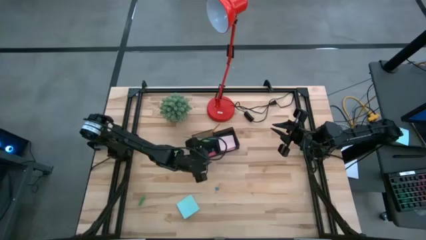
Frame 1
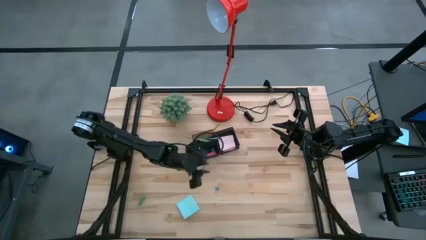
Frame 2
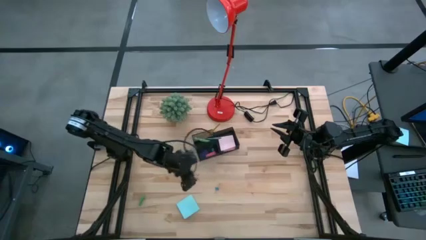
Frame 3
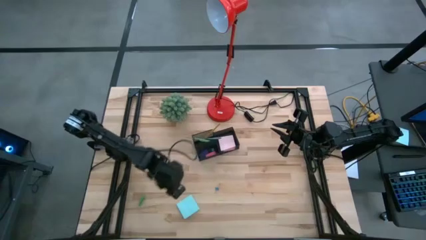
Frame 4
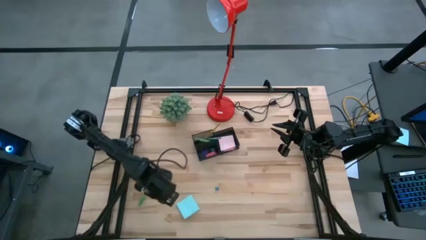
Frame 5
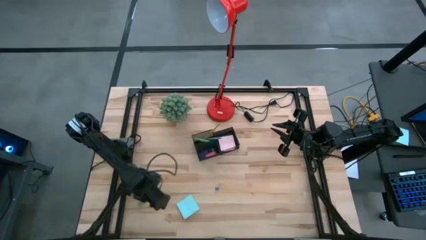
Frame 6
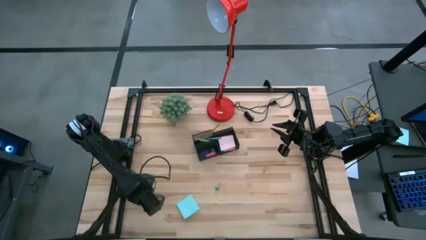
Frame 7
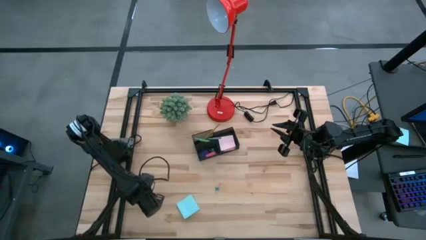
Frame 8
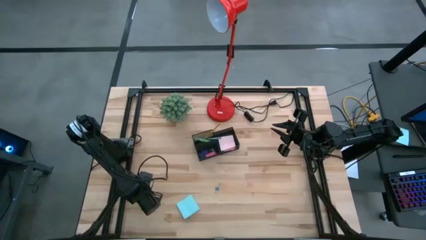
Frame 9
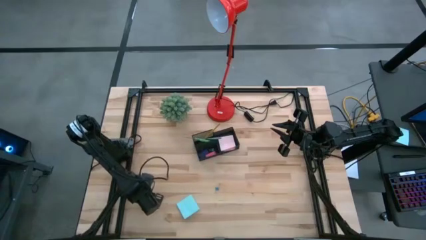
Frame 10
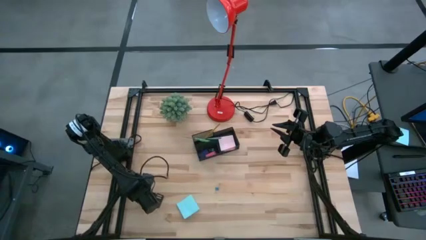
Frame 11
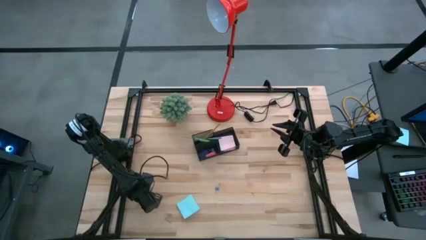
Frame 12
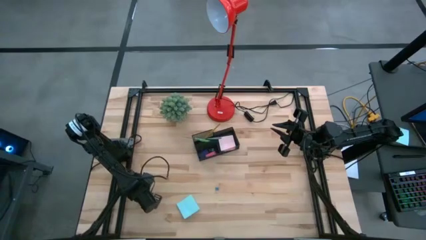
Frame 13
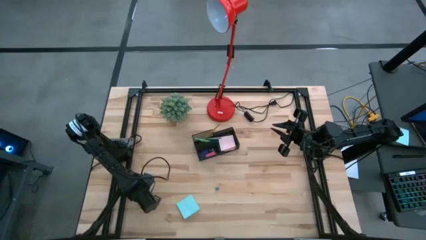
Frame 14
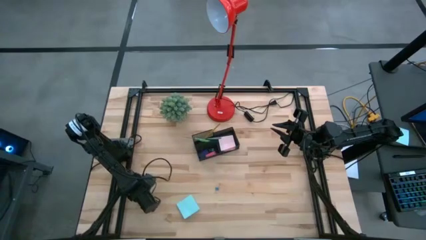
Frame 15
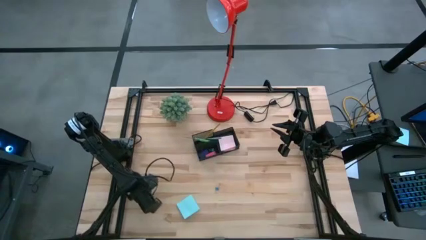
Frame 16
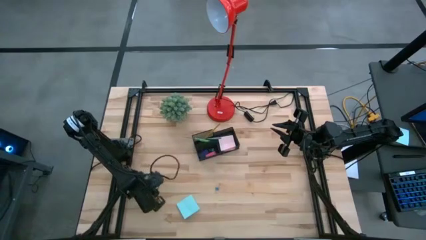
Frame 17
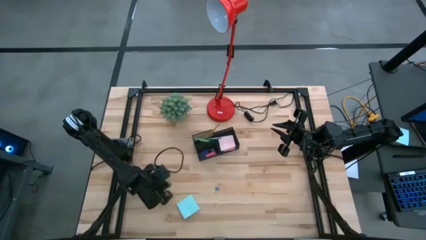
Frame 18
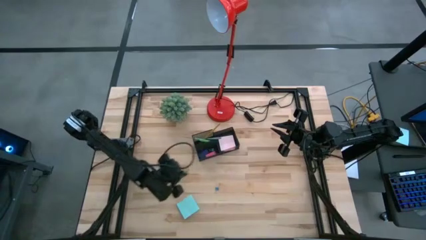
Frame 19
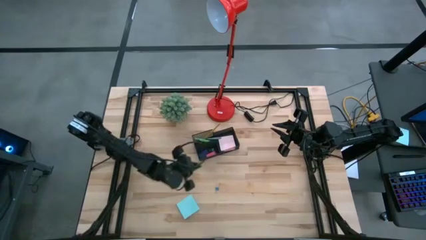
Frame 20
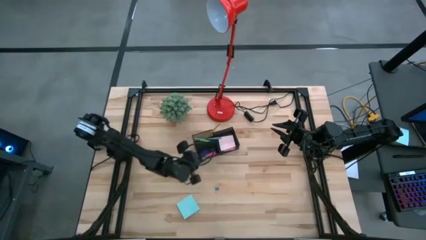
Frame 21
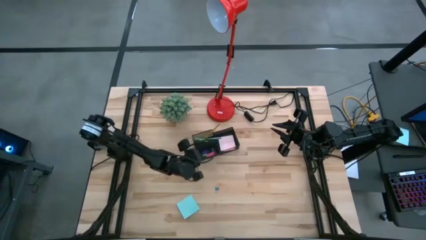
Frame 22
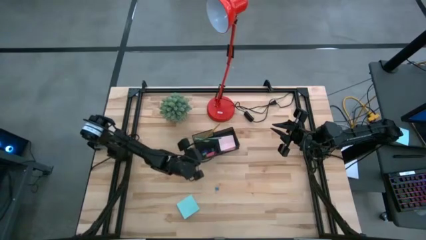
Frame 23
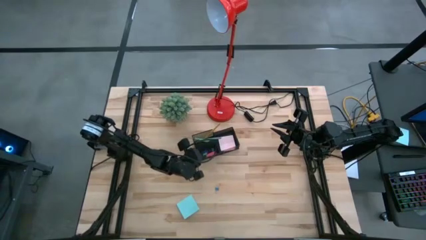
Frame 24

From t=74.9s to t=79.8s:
Task: Pick and place office supplies into organizer
Put the green eraser into the black desk organizer

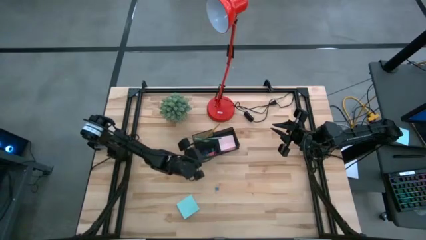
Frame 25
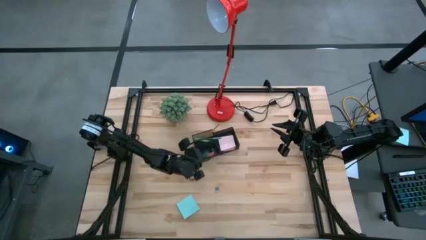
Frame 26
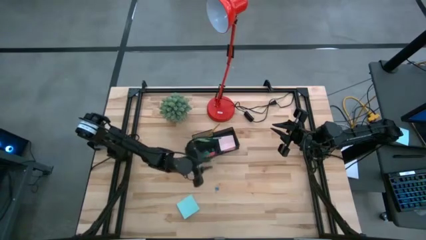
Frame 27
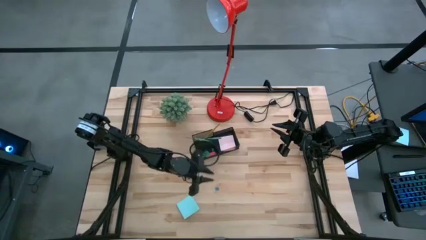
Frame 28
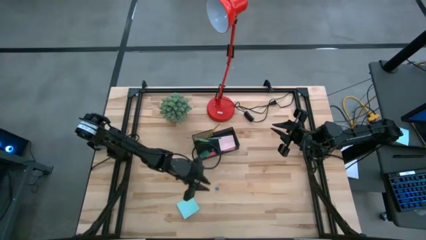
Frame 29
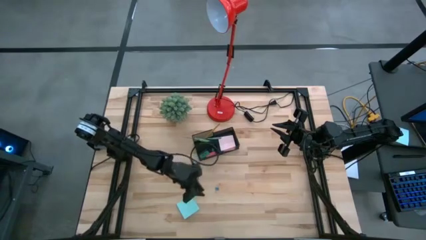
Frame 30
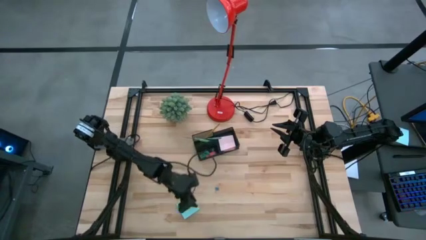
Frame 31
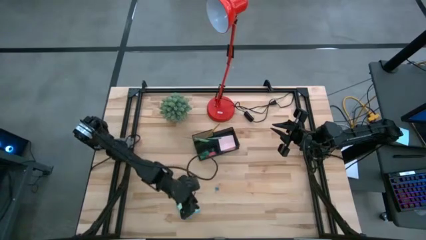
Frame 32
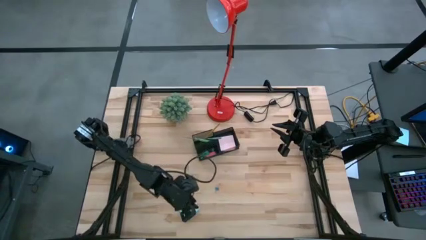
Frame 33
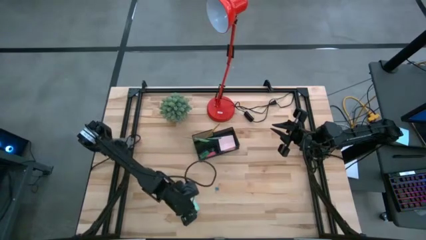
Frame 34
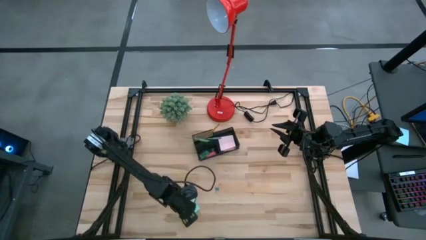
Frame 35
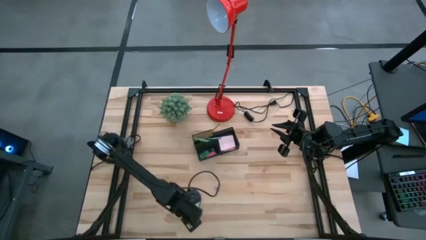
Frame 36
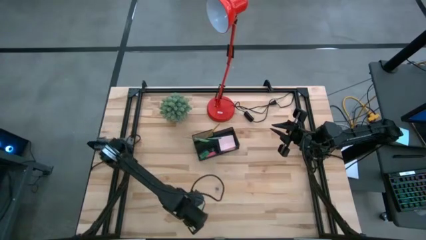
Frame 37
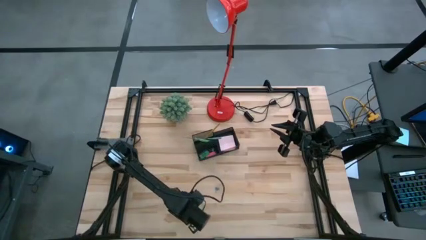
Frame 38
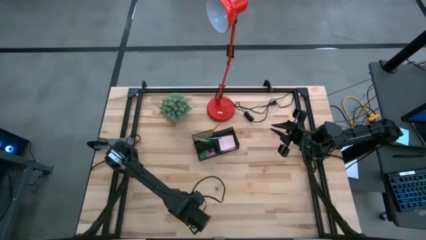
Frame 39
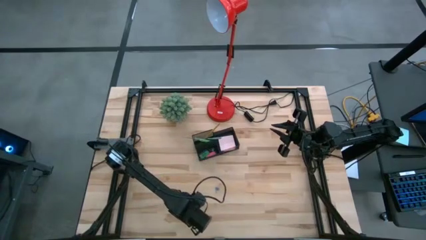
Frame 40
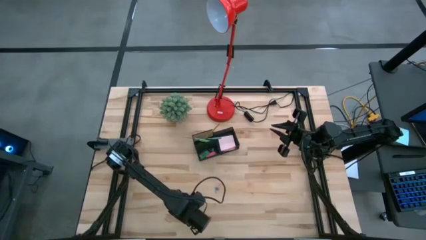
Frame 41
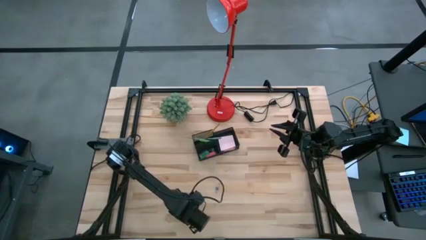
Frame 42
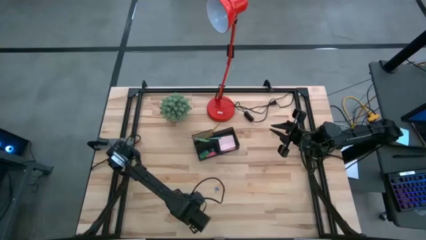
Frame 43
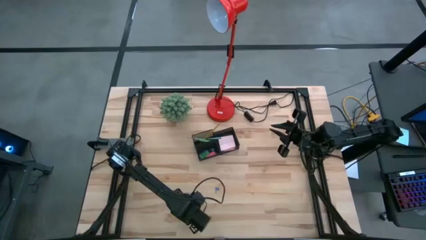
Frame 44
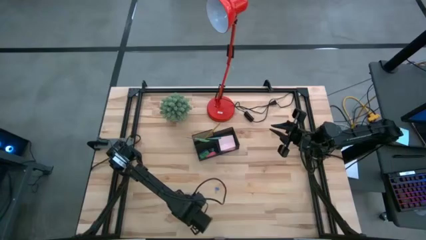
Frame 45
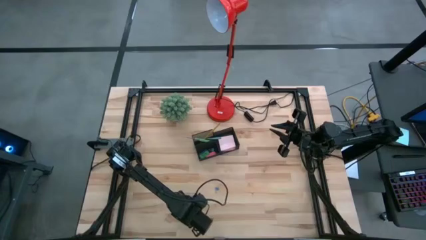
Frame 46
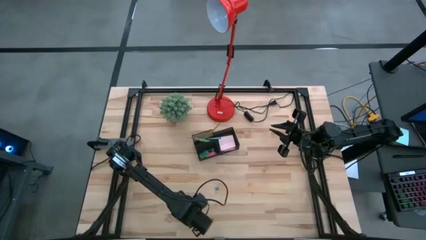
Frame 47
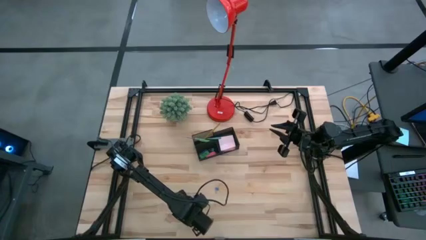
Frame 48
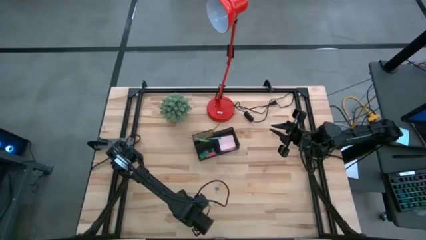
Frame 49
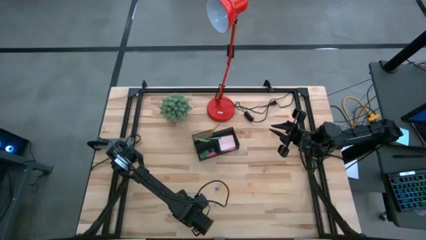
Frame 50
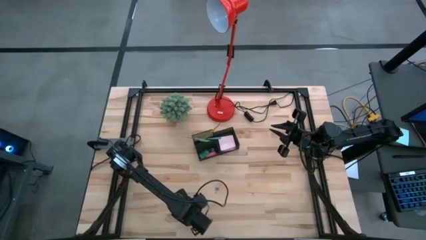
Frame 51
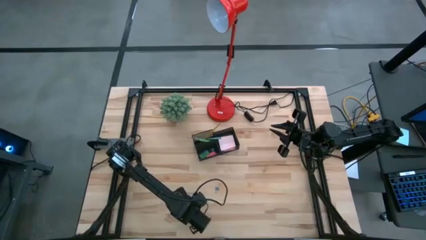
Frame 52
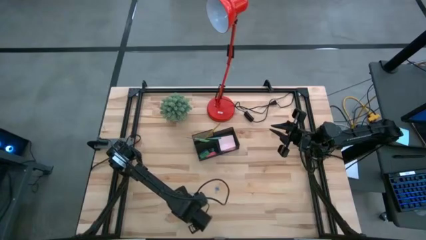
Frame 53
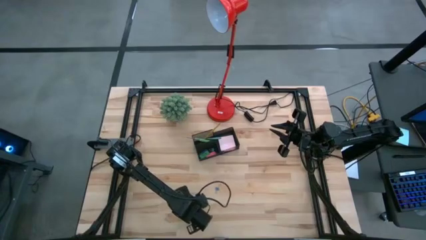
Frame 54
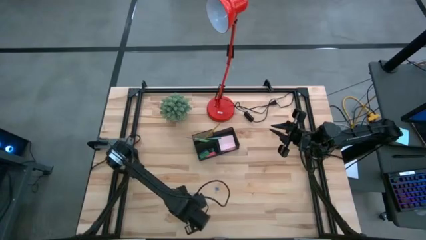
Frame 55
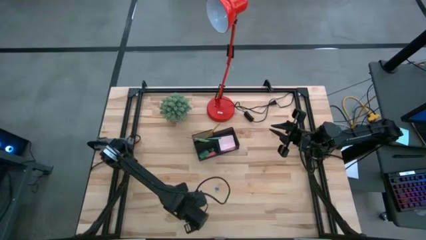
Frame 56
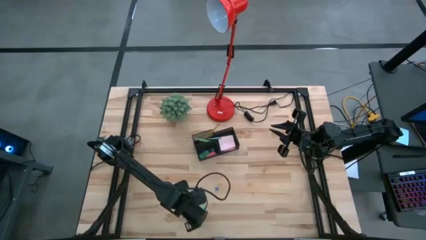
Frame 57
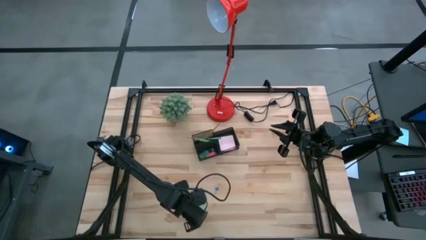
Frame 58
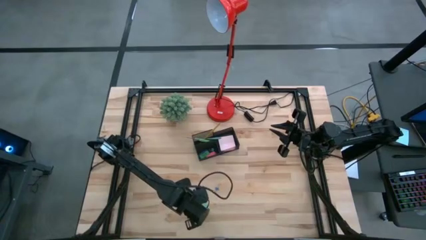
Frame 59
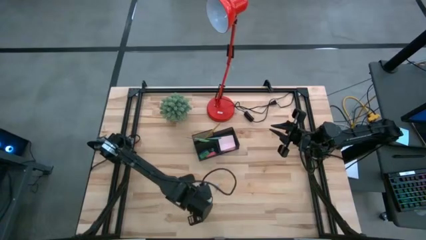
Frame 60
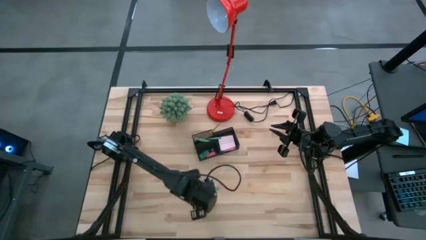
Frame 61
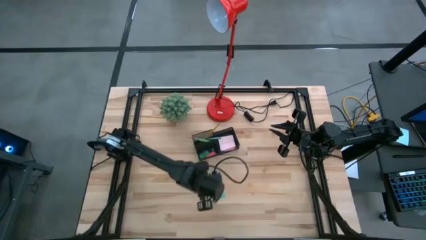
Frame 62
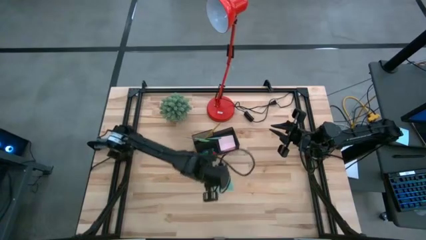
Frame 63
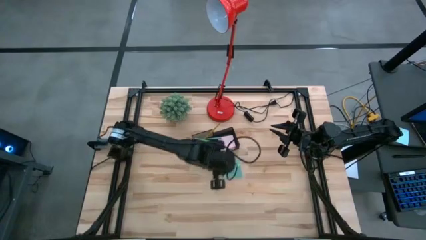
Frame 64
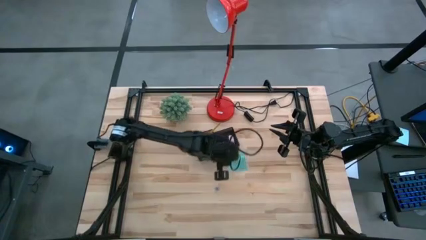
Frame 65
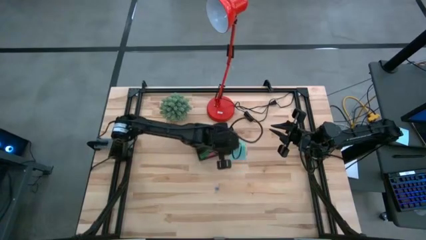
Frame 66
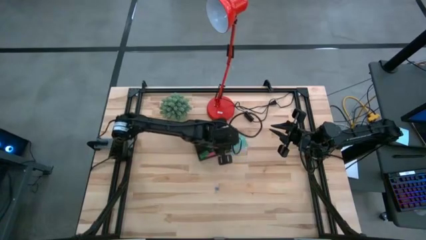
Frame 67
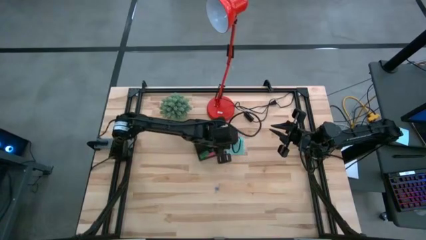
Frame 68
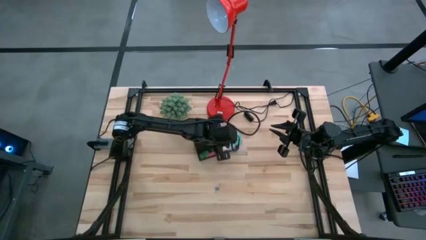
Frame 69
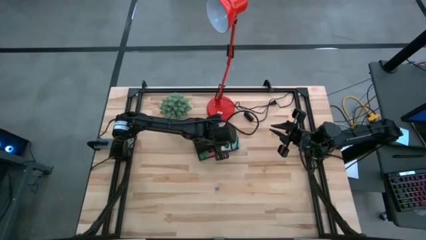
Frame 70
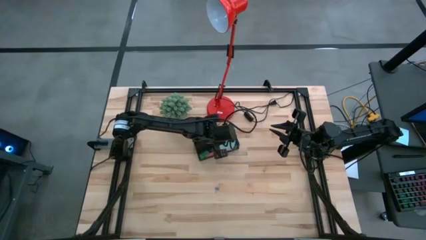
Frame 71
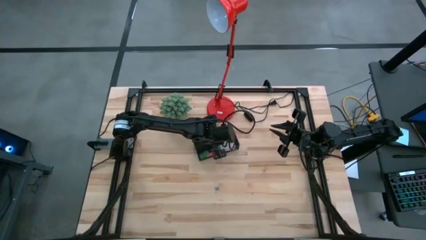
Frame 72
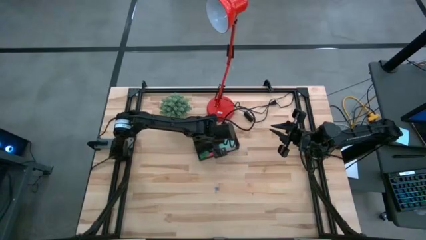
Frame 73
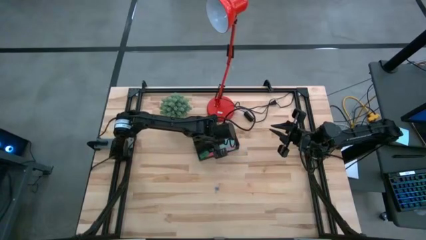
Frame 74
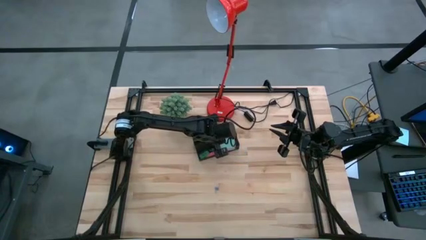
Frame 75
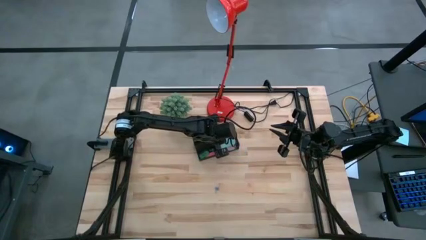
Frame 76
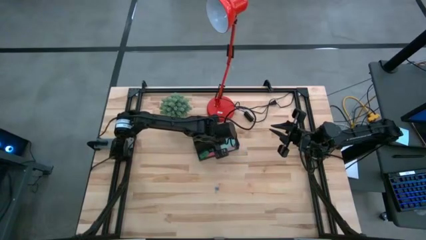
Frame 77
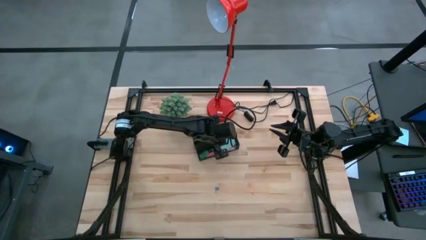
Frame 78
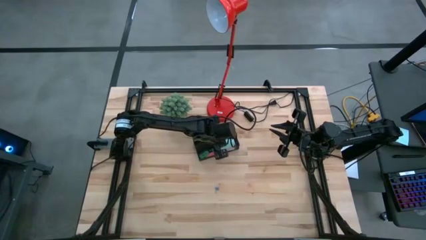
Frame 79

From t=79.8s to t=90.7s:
Put the light blue sticky notes into the black desk organizer
